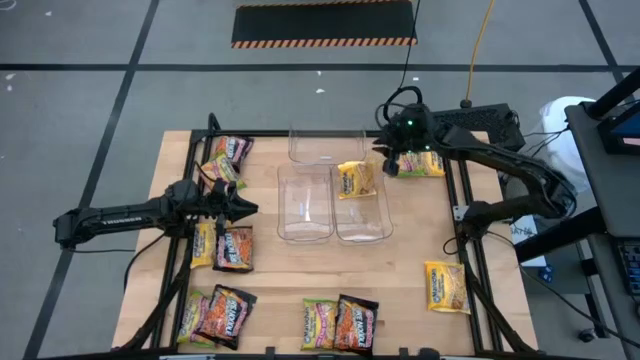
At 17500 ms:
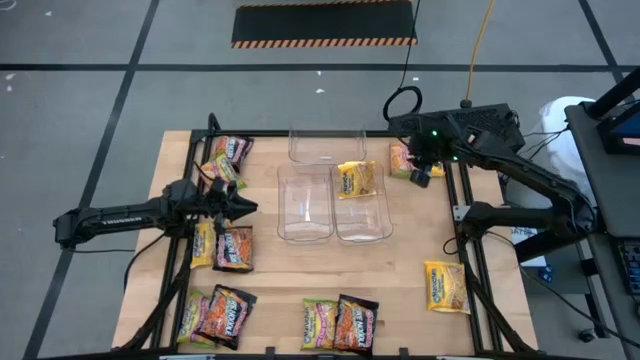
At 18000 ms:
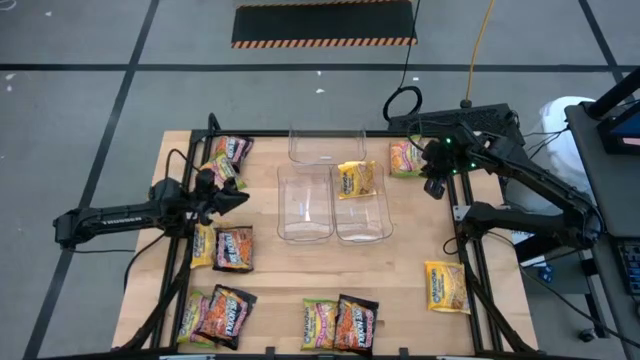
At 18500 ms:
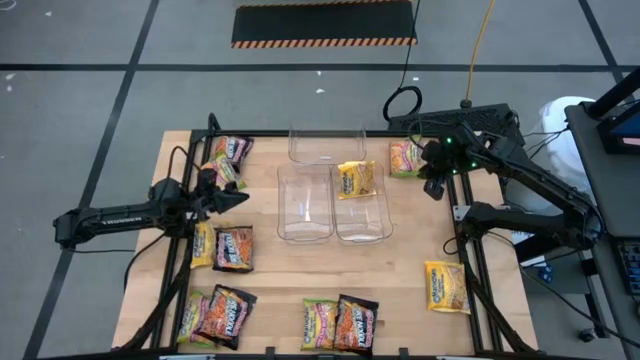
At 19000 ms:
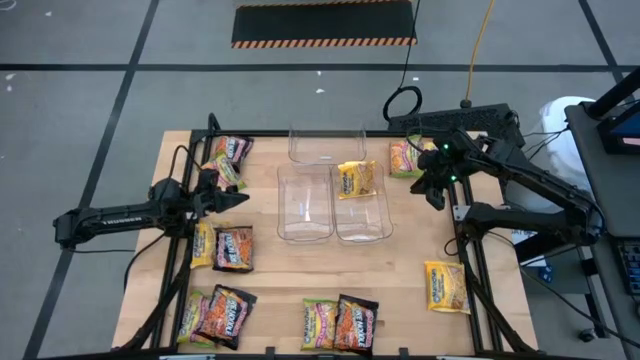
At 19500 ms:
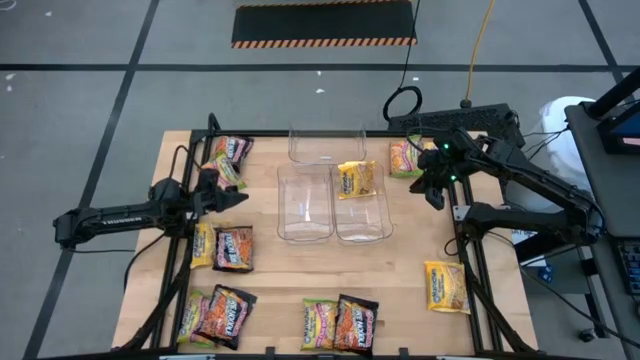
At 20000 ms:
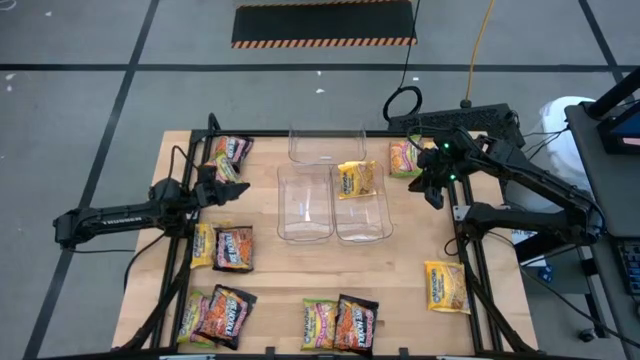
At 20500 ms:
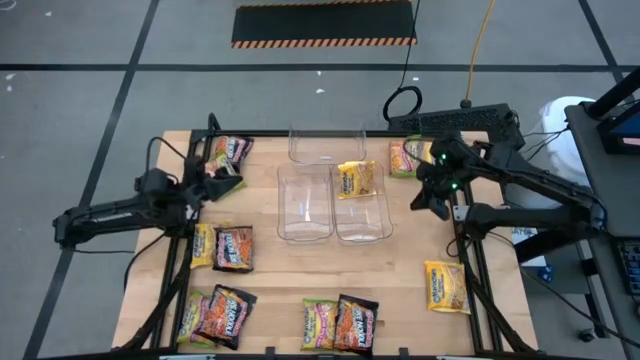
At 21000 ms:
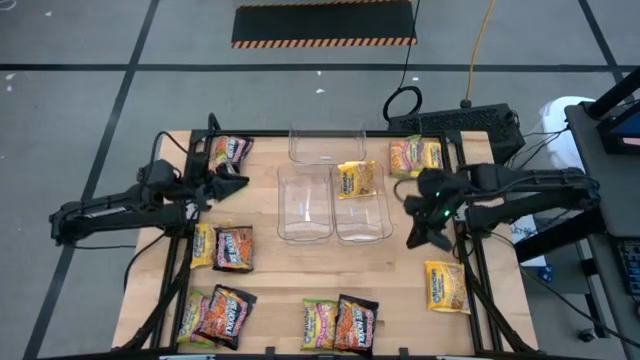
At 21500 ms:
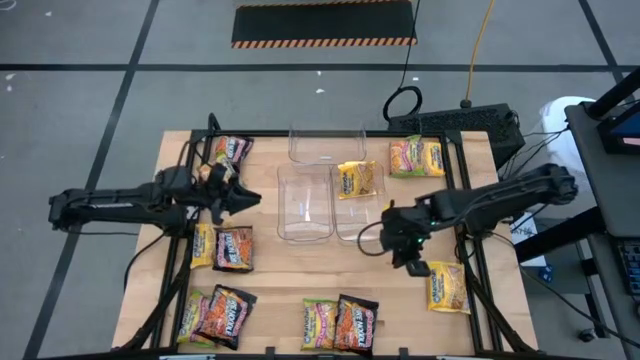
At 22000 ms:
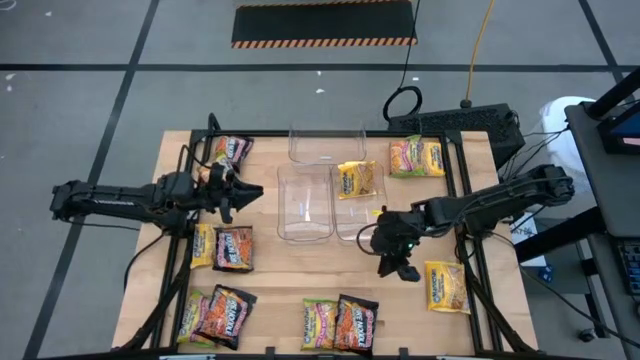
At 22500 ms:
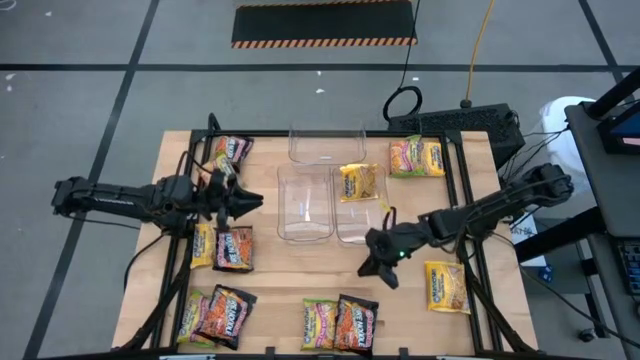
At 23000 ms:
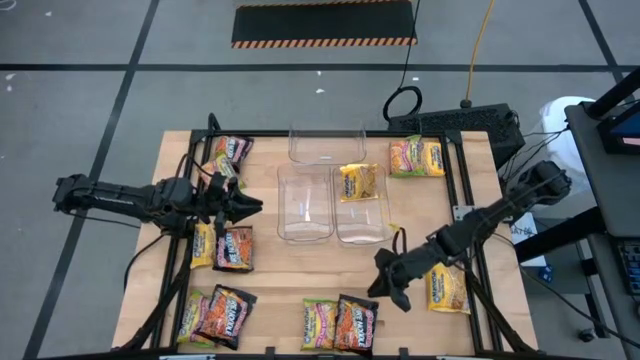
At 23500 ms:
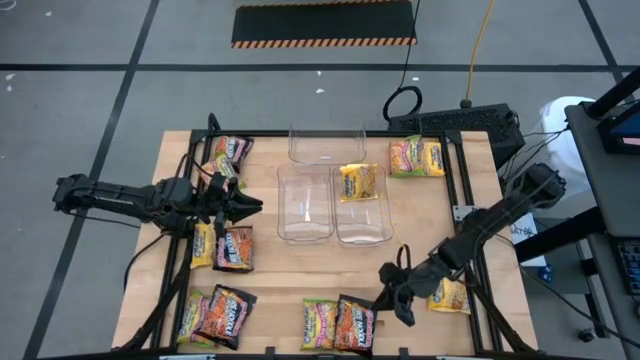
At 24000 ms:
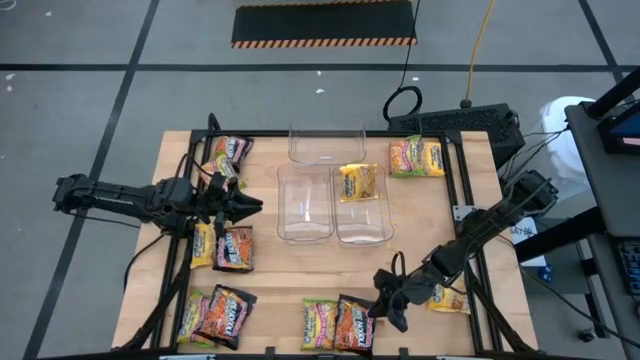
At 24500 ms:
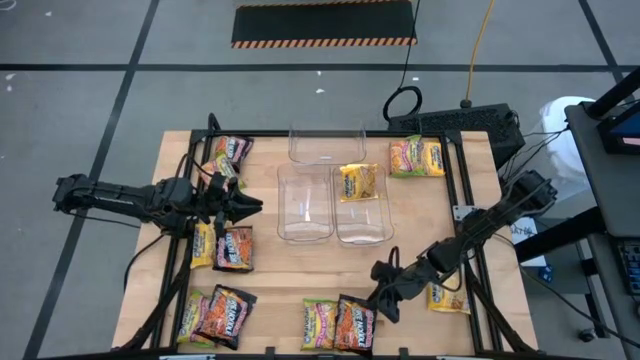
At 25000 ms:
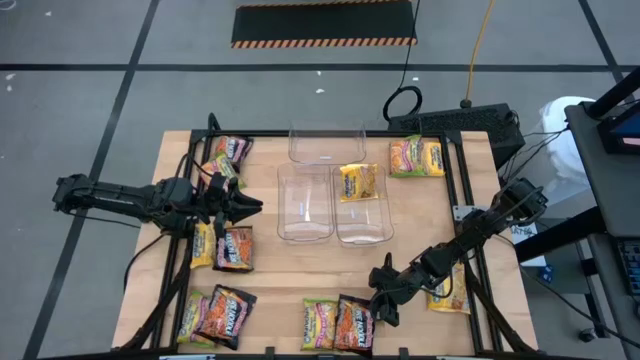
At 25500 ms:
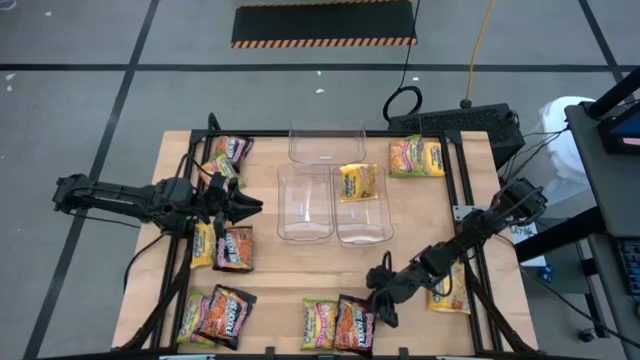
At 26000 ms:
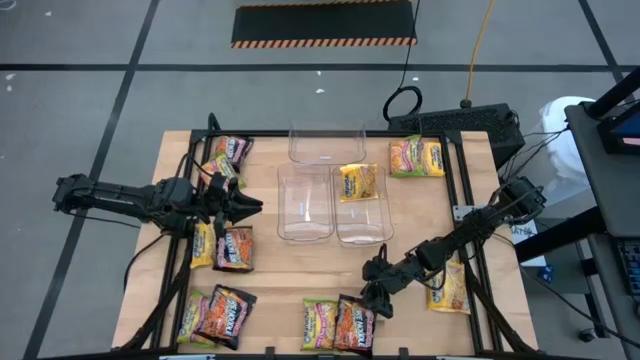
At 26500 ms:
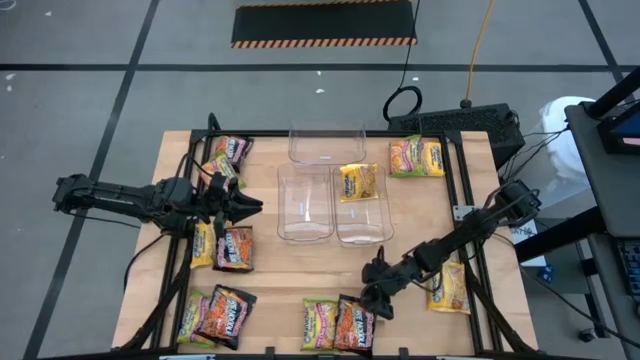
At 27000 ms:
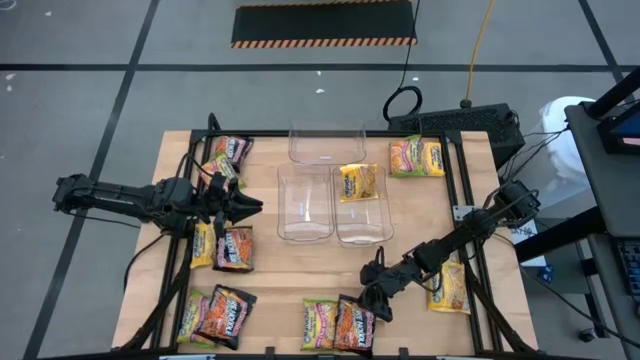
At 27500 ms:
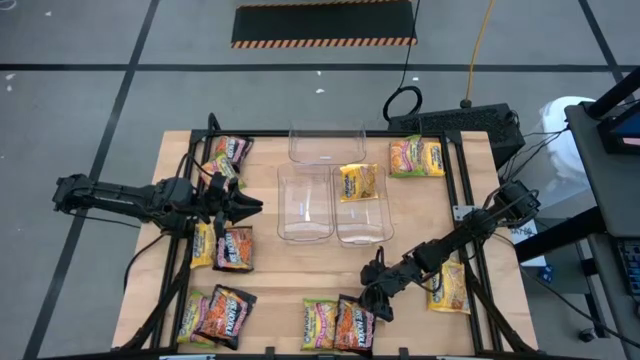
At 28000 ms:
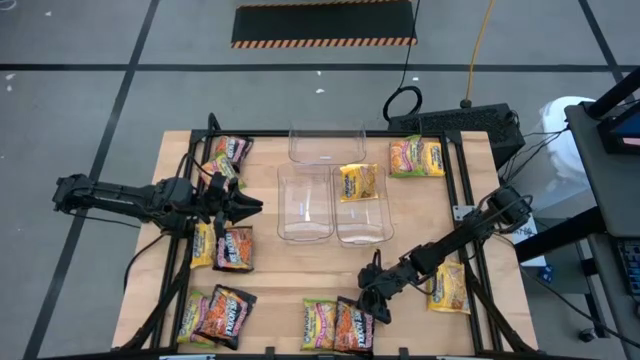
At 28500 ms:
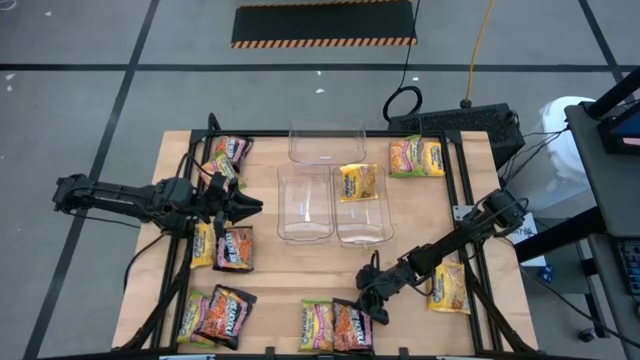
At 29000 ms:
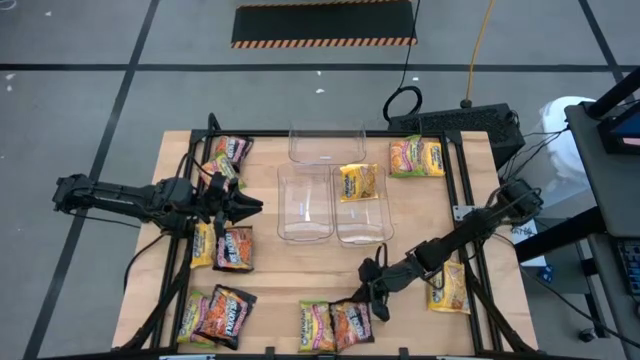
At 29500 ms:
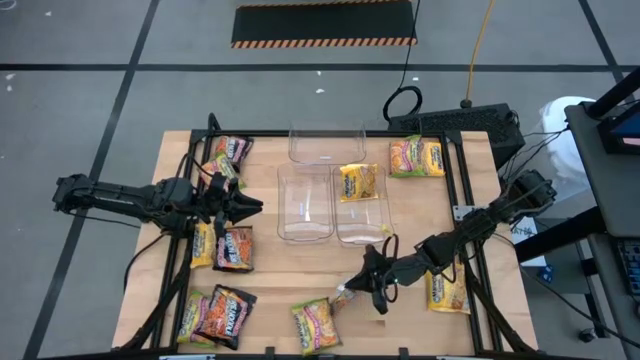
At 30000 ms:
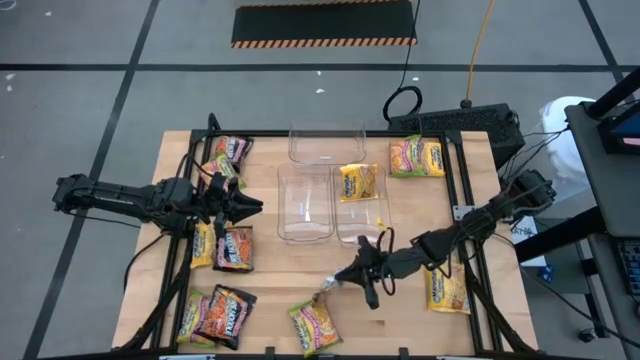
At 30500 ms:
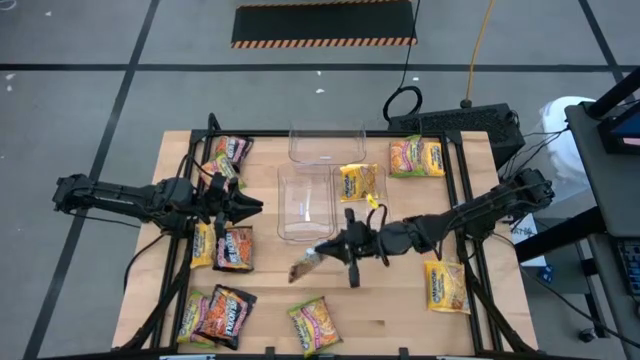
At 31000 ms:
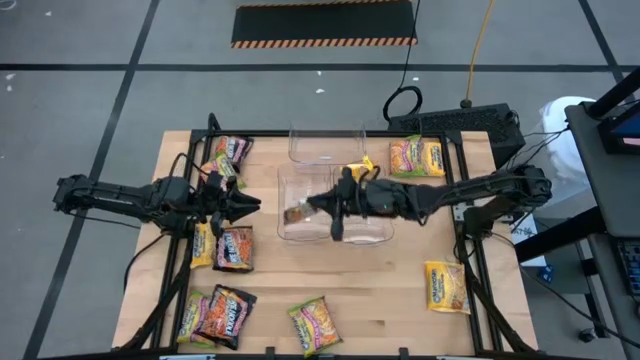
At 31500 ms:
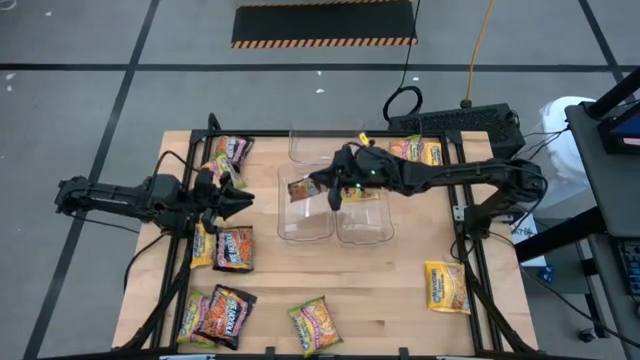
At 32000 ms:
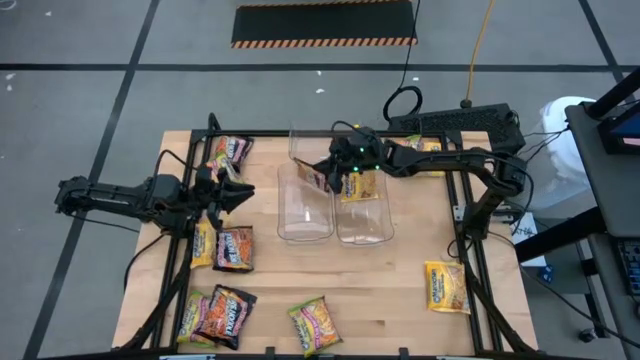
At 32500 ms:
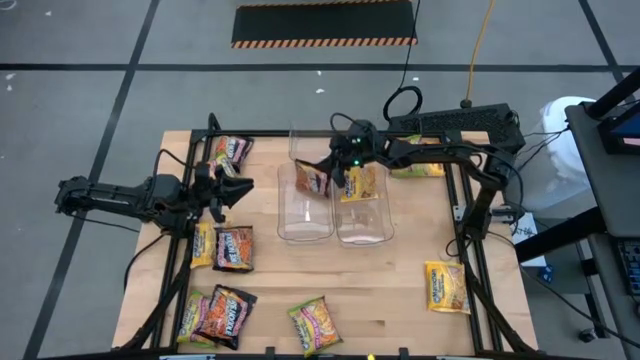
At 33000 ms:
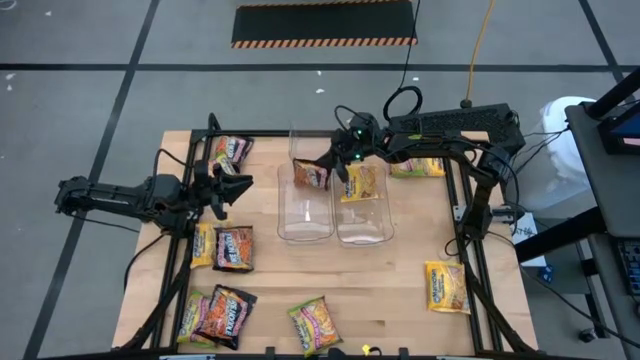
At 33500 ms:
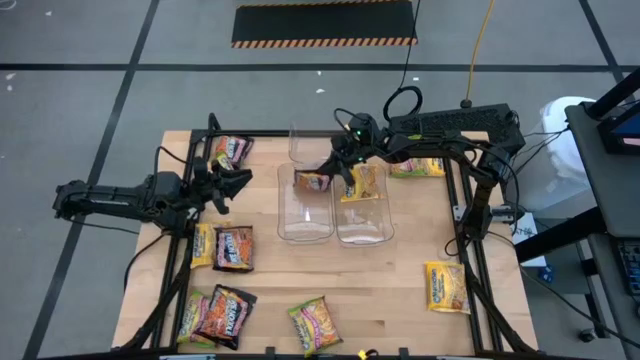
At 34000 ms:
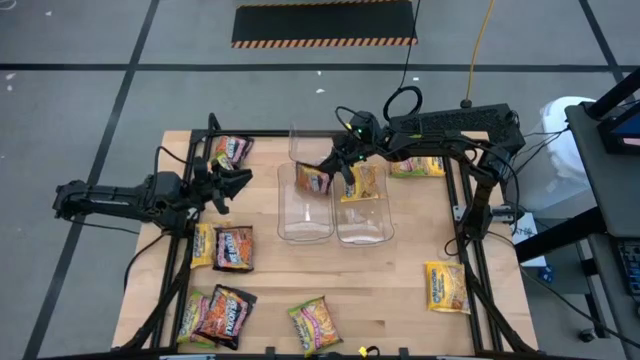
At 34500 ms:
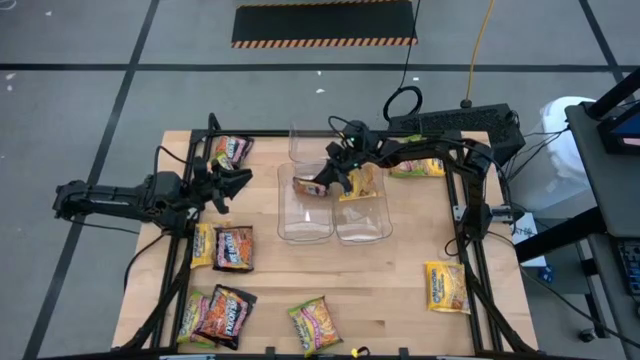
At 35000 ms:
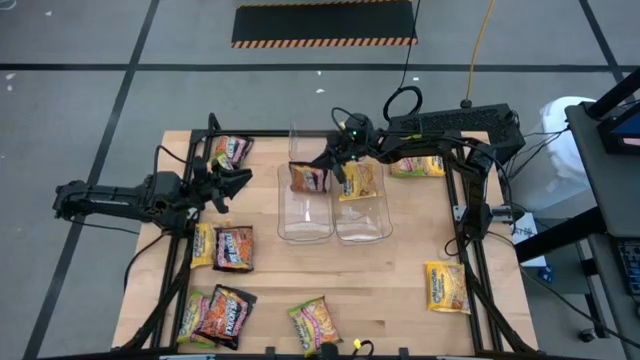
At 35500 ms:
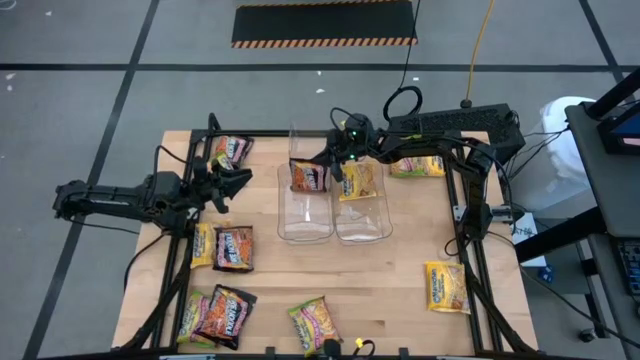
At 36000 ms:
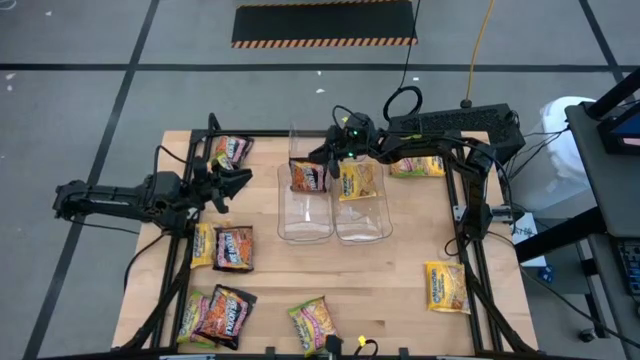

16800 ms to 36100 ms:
Task: Sort Maruchan noodles
Put the black noodle pack into the left transparent bin

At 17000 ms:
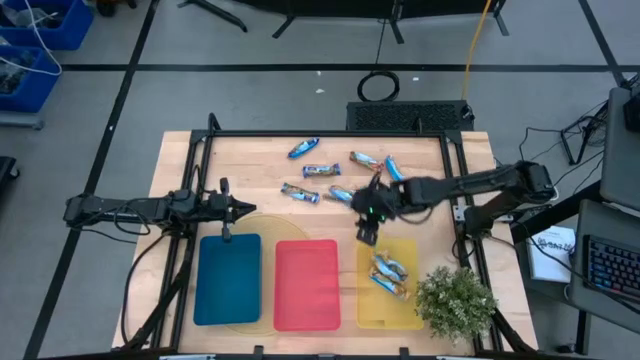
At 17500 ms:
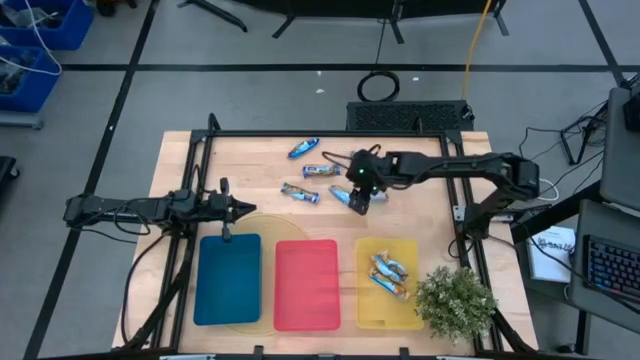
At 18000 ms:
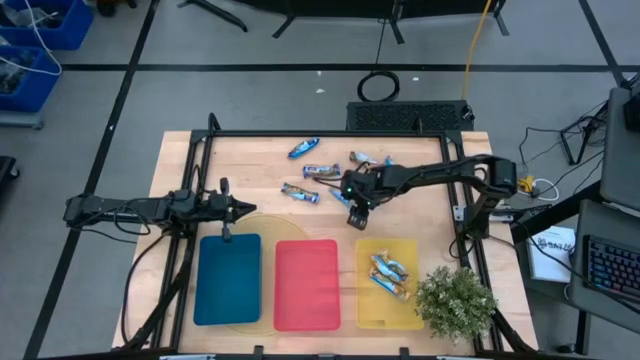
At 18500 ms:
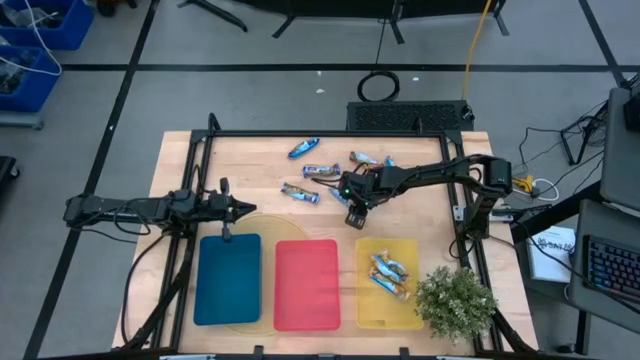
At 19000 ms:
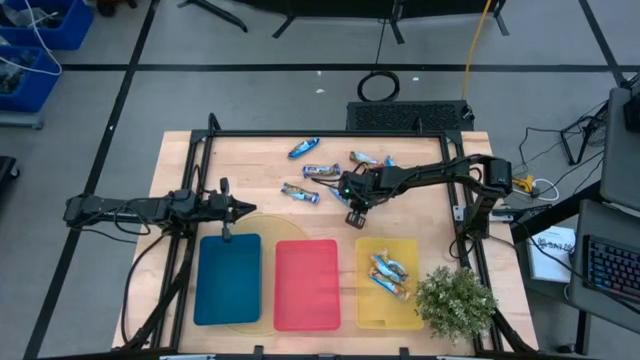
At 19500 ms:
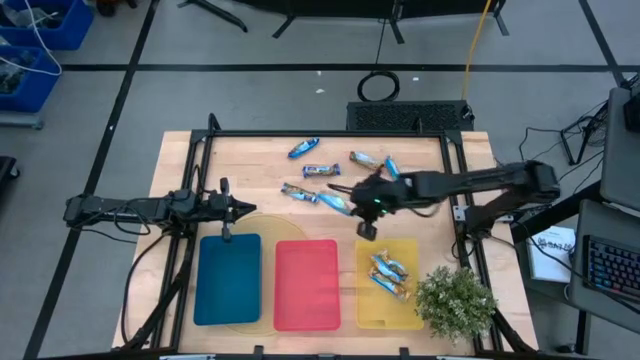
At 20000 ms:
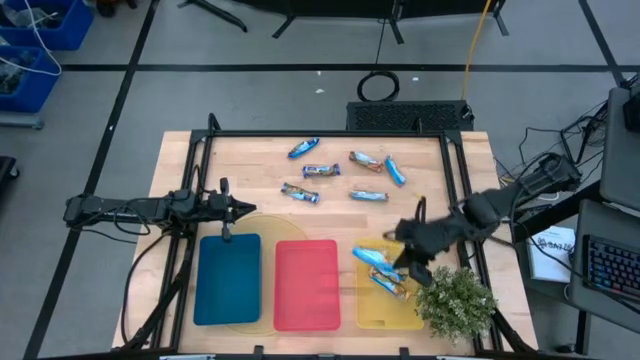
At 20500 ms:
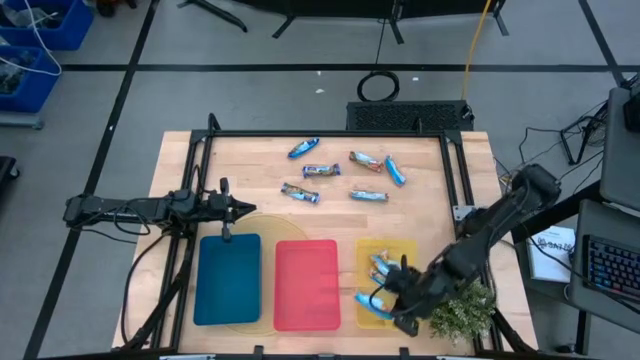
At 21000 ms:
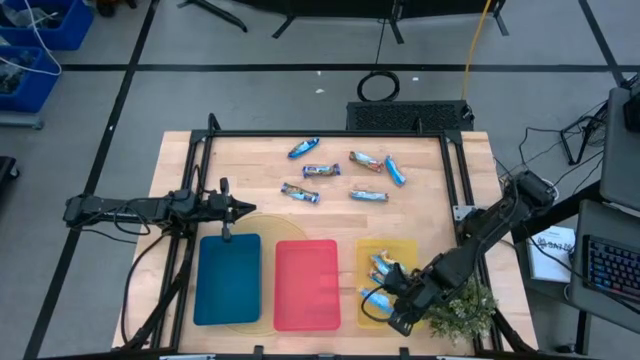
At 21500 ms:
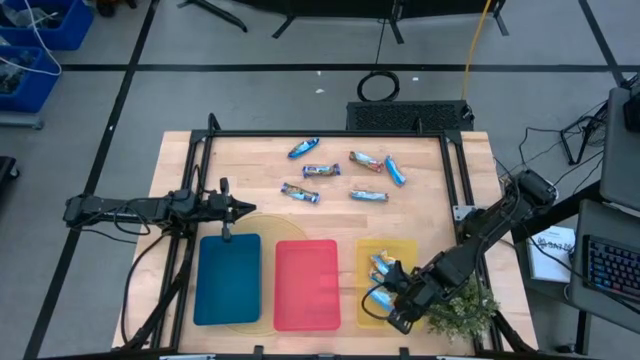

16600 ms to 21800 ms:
Task: Pick and place Granola Bars by type
Put the yellow granola bar into the yellow bin
